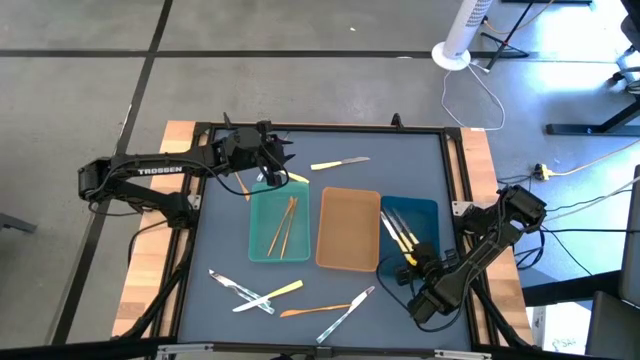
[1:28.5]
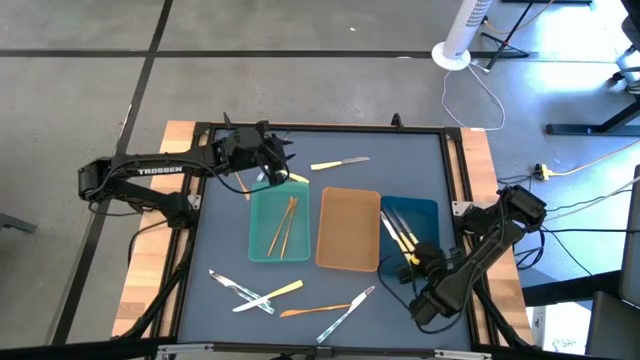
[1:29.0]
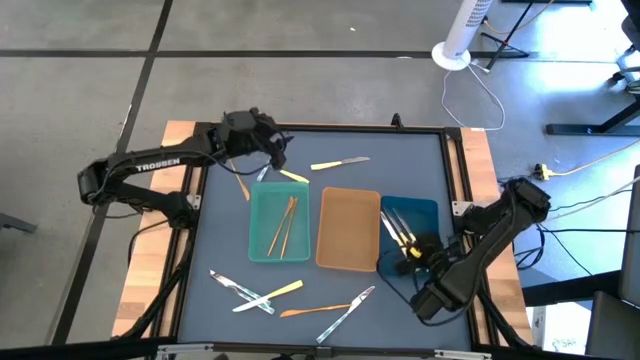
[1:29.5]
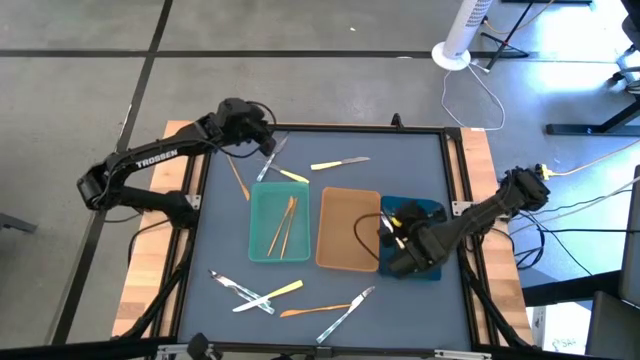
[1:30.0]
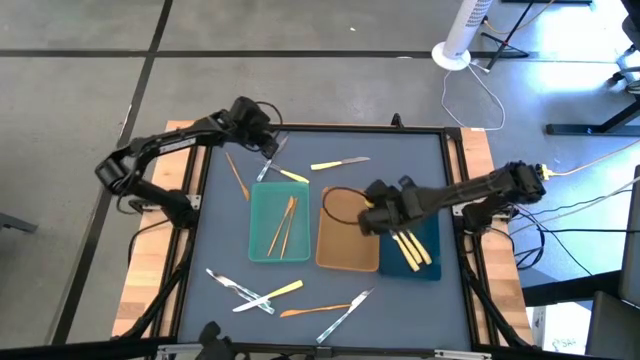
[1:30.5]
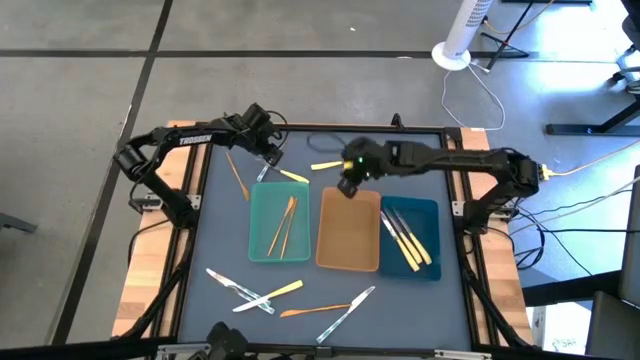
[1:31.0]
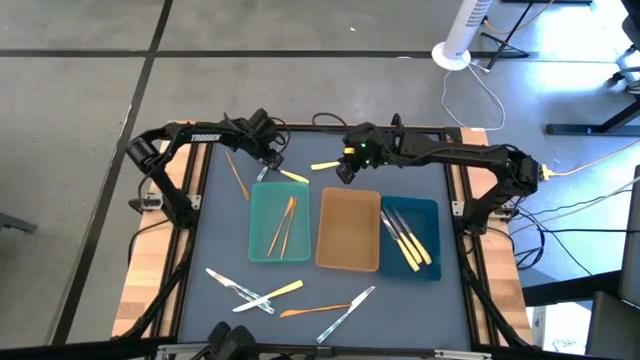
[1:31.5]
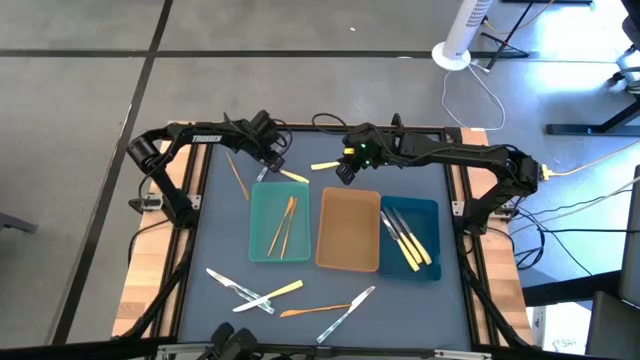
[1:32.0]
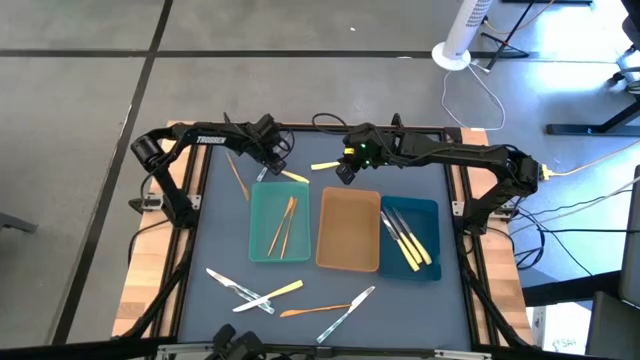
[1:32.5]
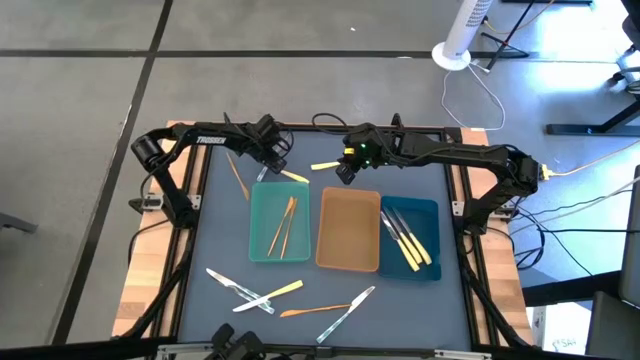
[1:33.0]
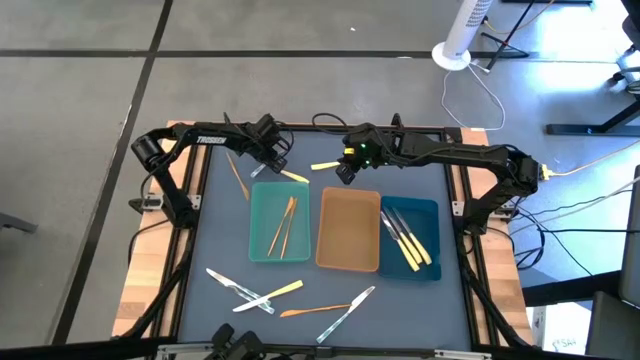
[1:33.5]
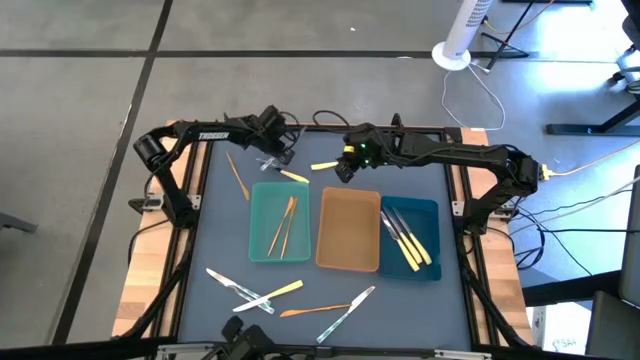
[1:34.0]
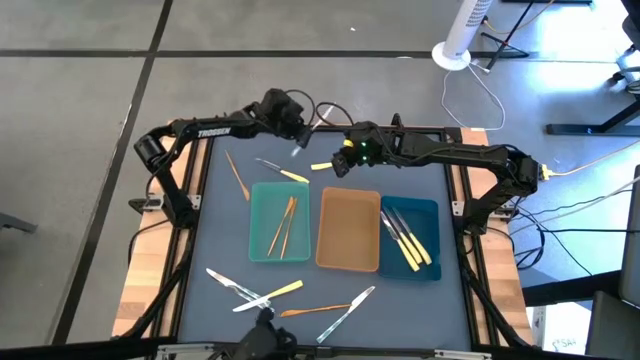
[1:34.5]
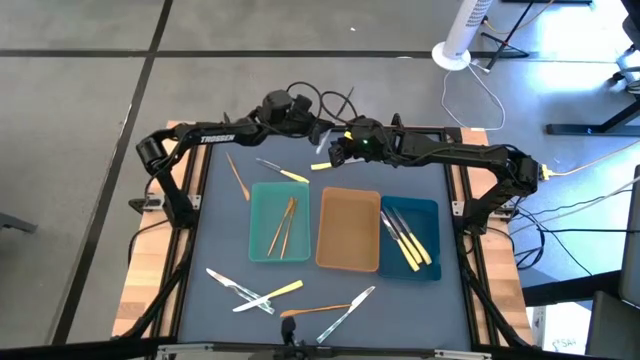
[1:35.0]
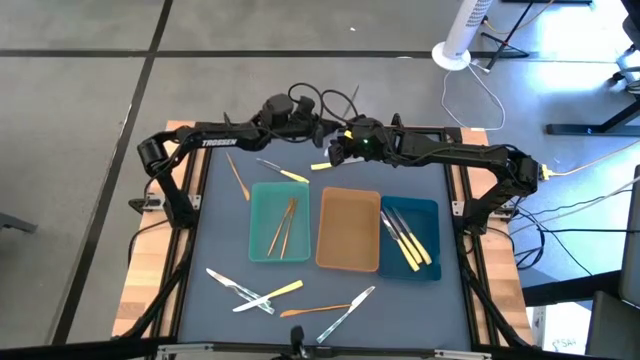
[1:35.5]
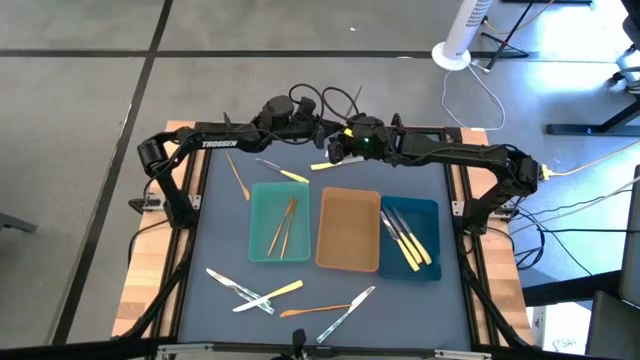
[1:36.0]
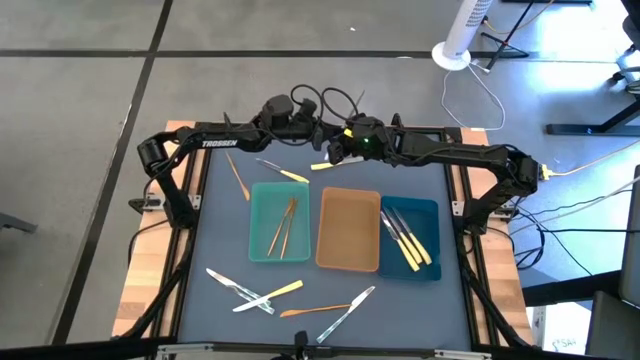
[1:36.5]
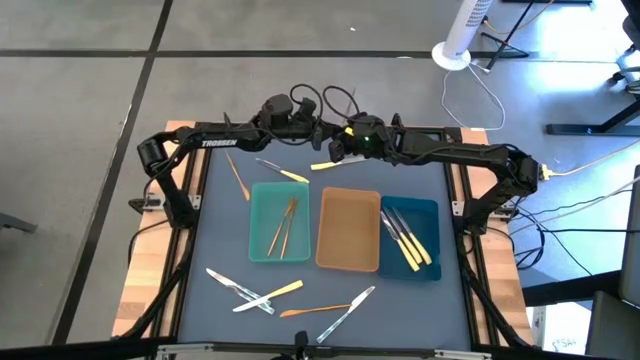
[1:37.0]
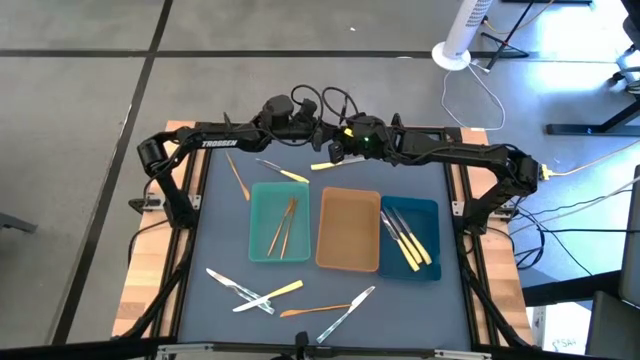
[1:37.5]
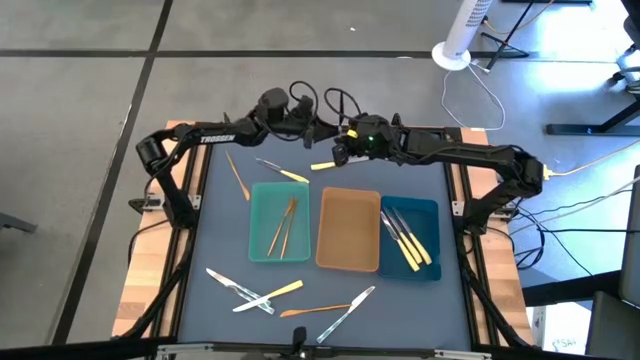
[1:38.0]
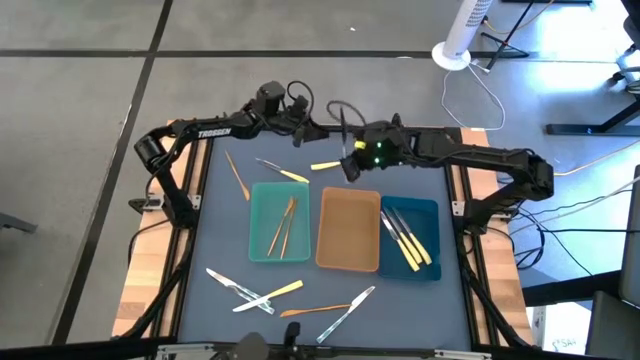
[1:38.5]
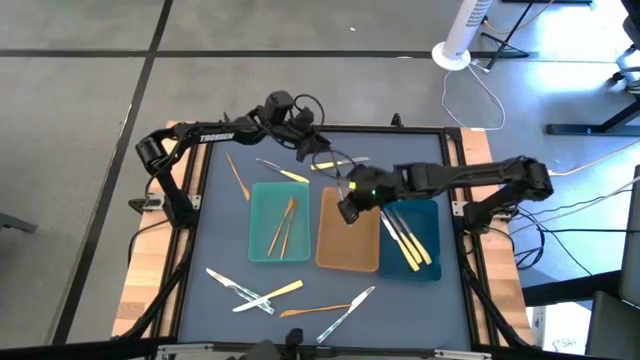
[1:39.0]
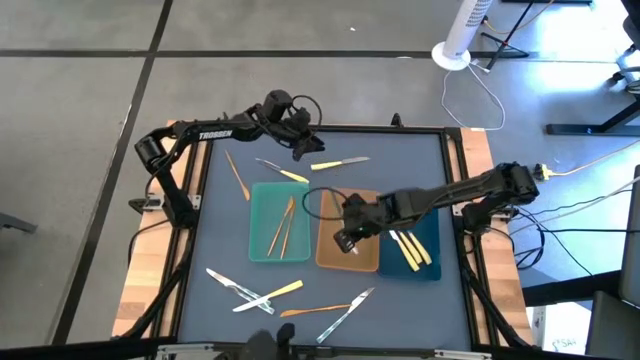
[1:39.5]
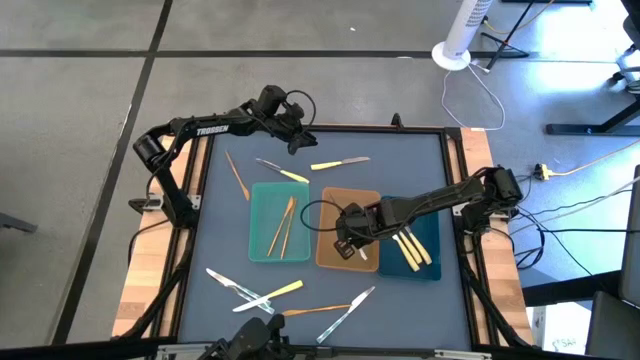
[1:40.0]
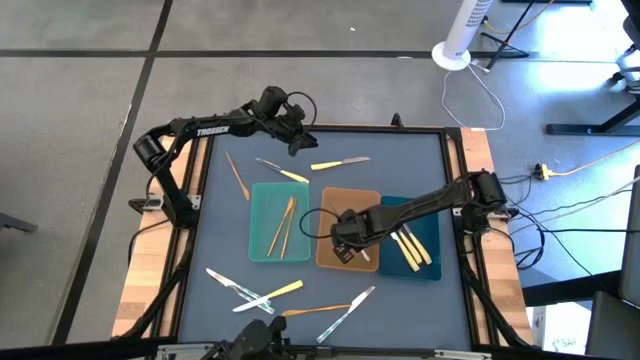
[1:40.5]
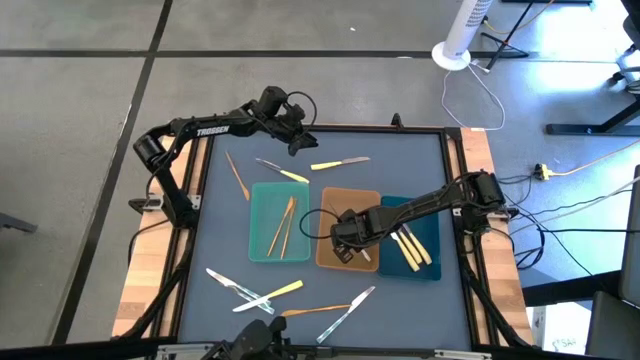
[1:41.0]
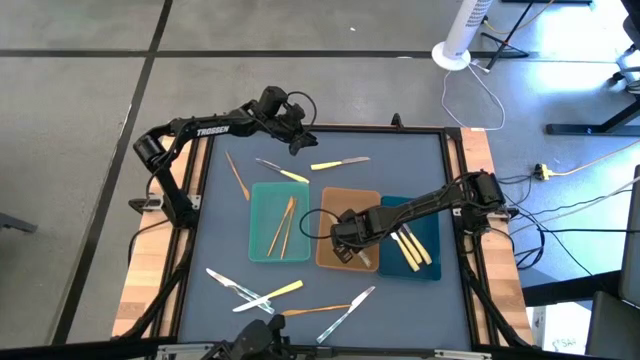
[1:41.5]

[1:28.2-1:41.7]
Task: Sort silverware by color (type)
Put the blue knife into the orange bin

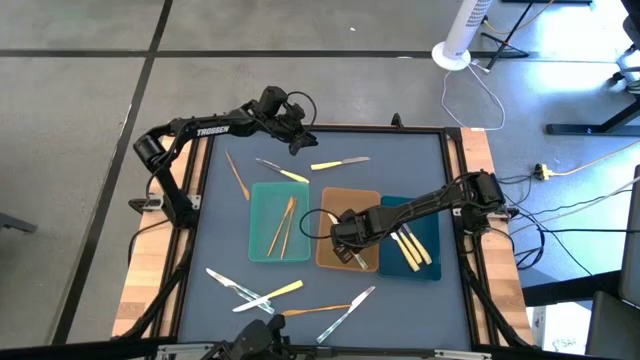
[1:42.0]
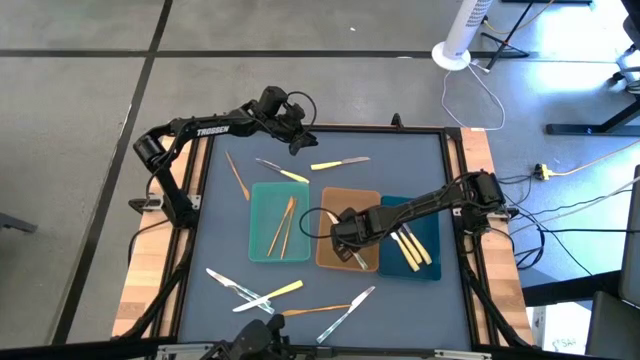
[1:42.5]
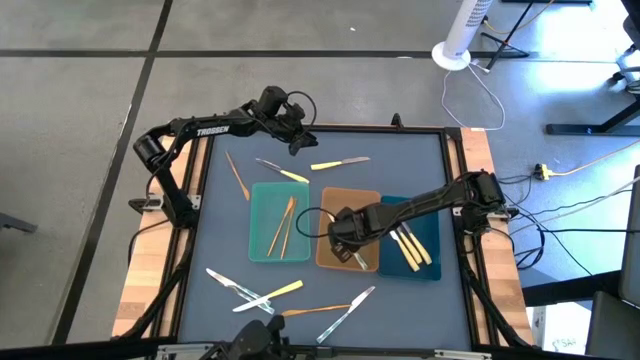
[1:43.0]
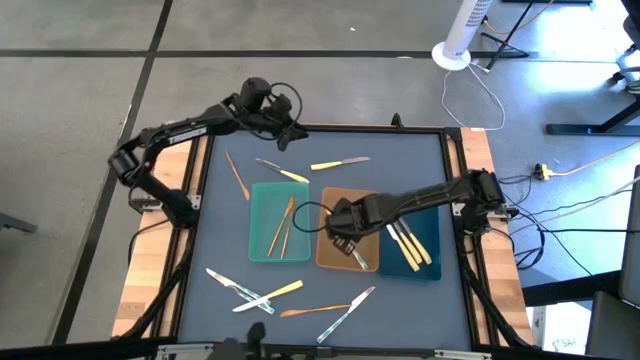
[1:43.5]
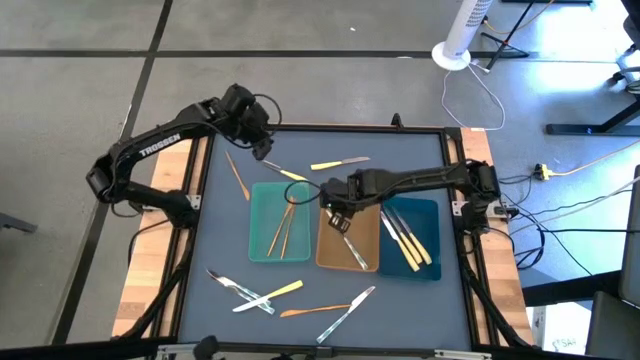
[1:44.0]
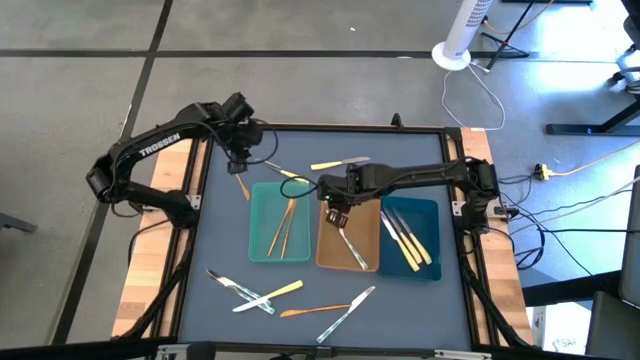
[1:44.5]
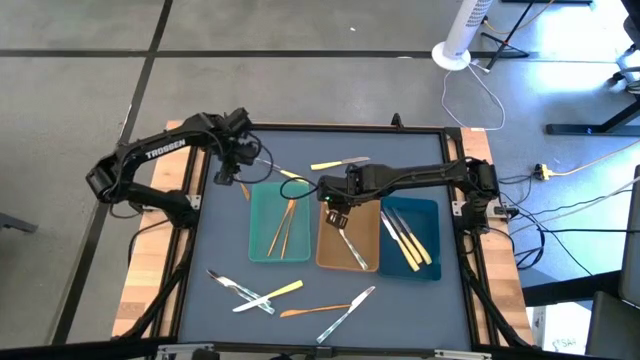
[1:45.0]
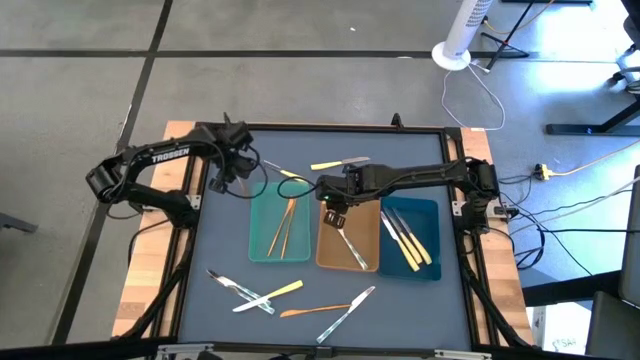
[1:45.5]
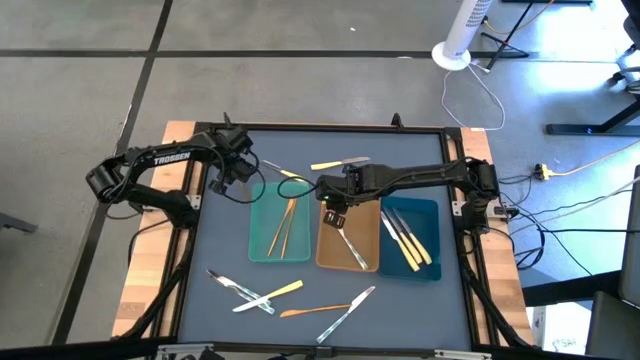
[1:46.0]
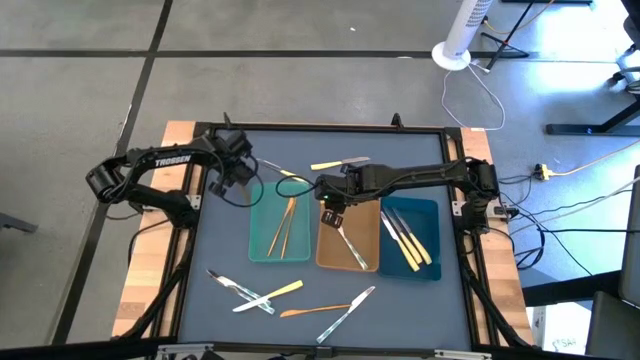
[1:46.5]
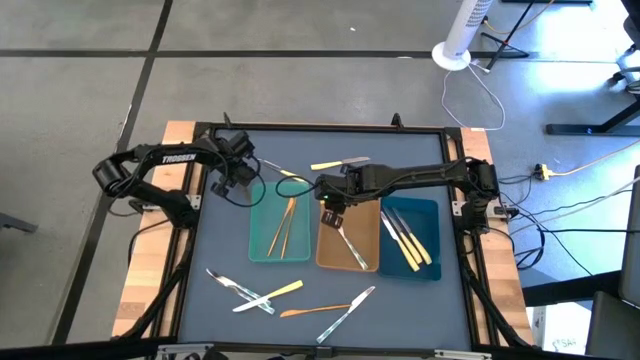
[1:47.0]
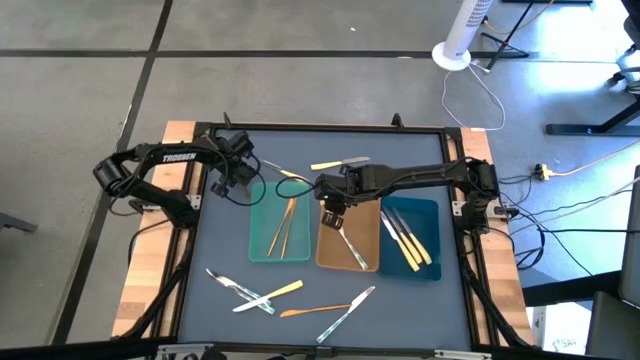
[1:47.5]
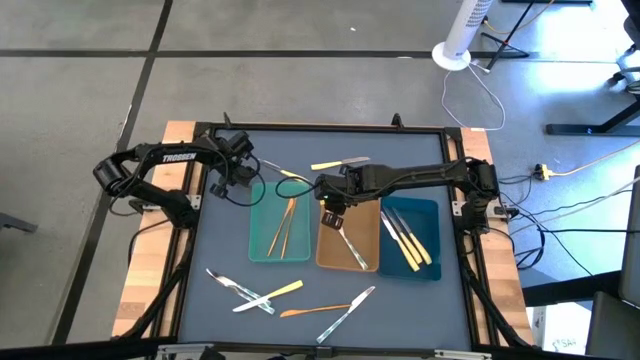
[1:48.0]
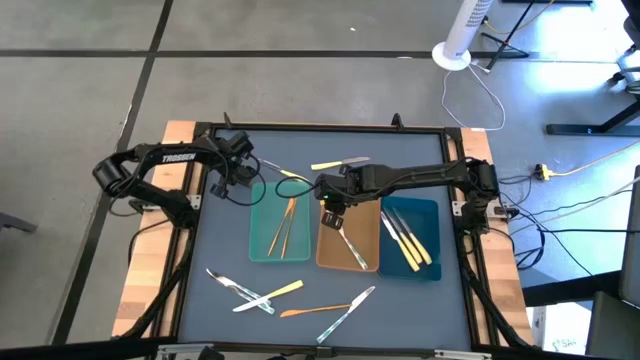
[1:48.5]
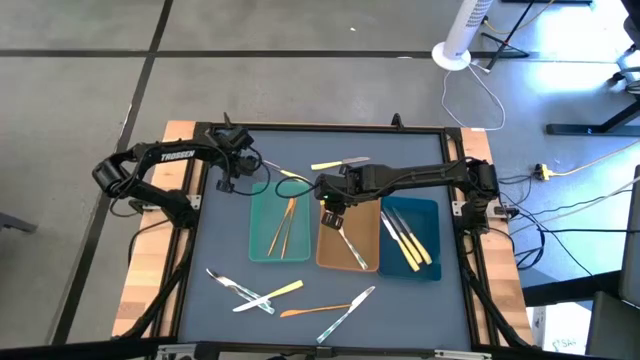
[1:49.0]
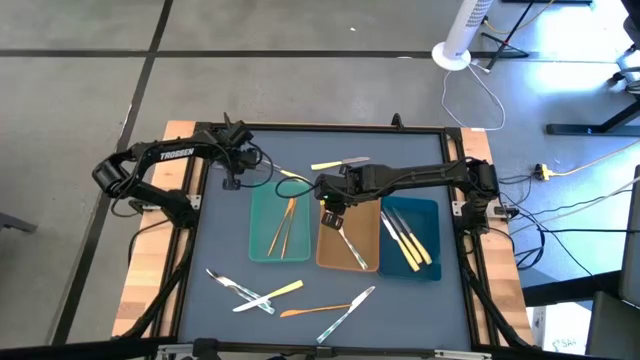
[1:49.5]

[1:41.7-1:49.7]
Put the gold knife into the green bin
